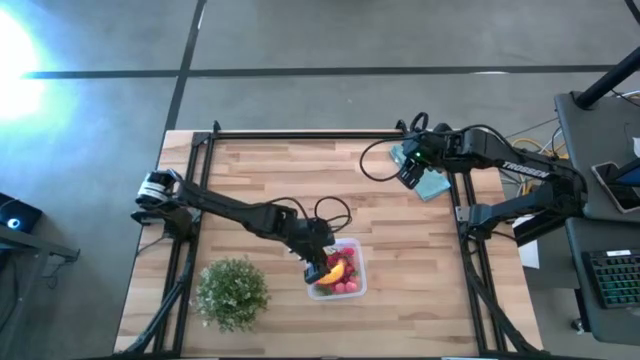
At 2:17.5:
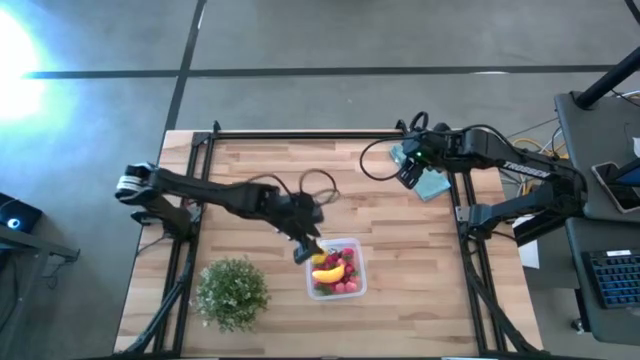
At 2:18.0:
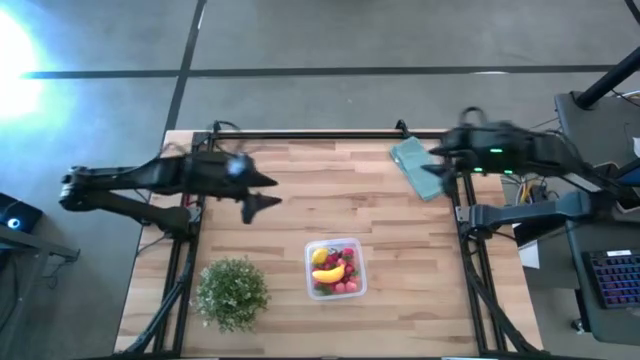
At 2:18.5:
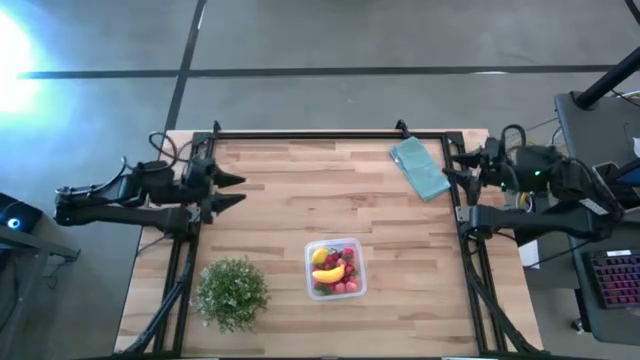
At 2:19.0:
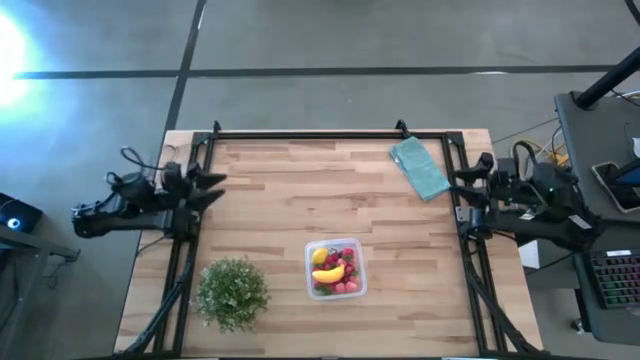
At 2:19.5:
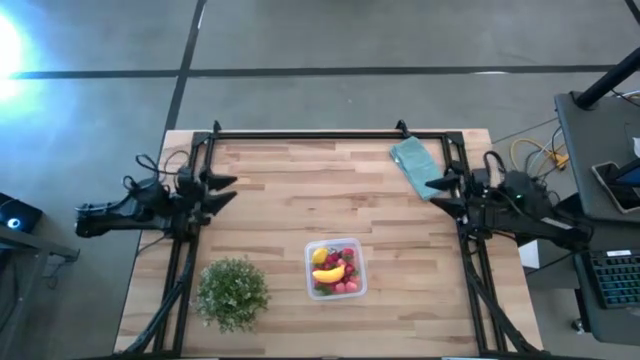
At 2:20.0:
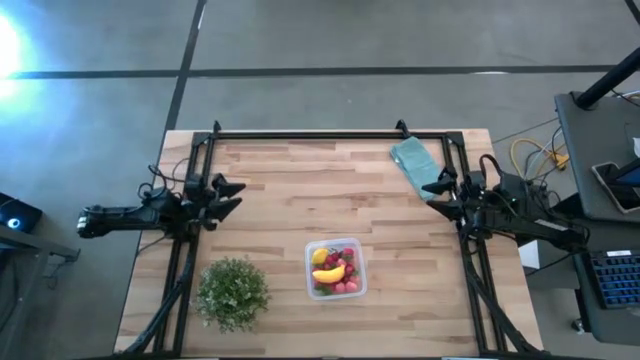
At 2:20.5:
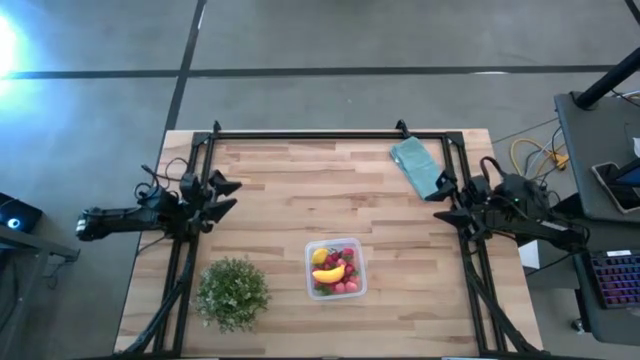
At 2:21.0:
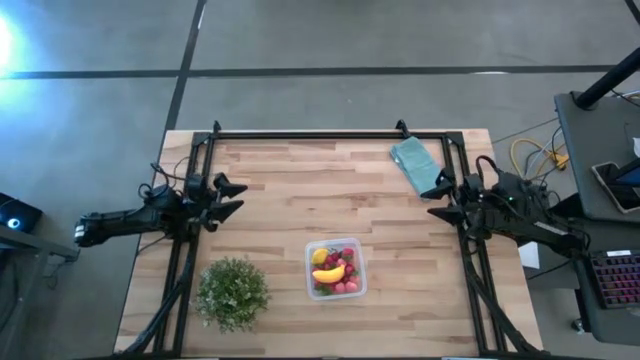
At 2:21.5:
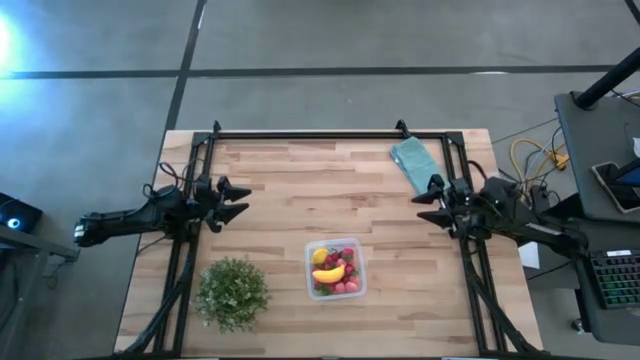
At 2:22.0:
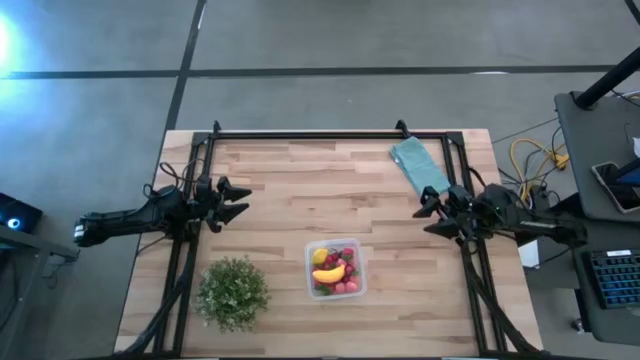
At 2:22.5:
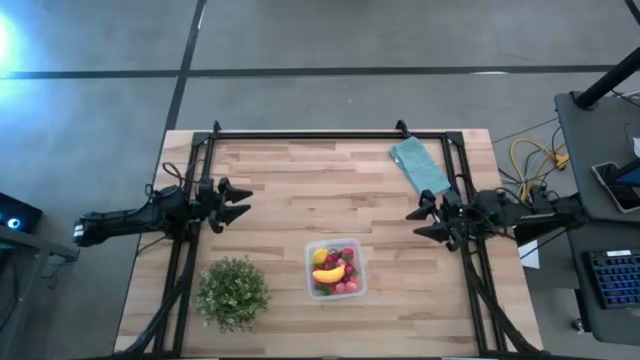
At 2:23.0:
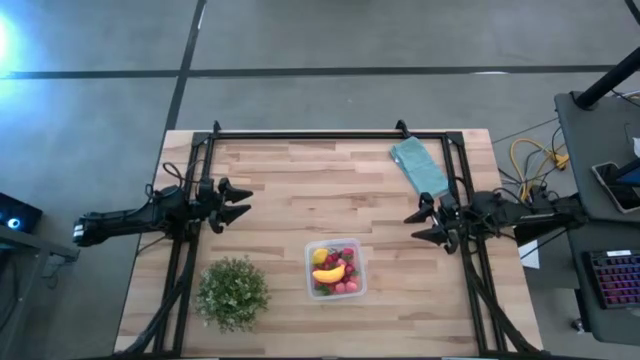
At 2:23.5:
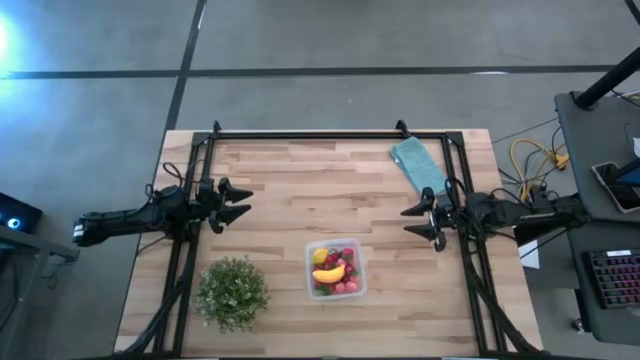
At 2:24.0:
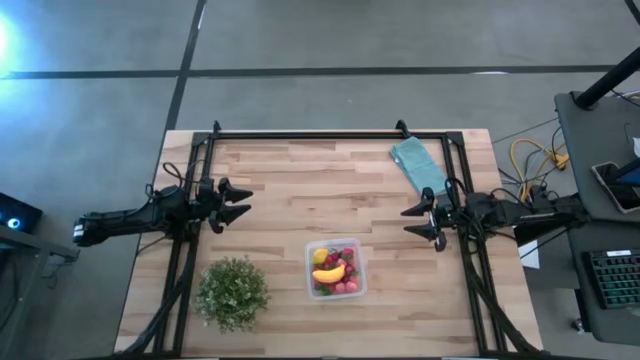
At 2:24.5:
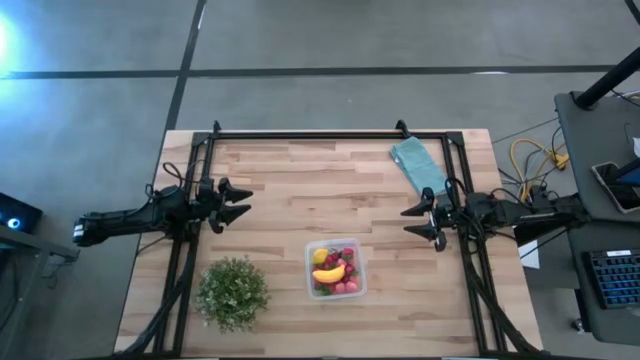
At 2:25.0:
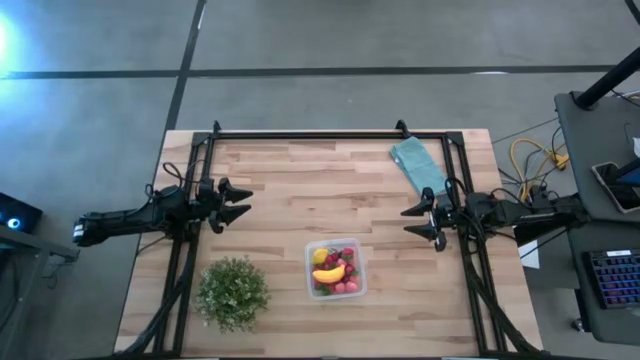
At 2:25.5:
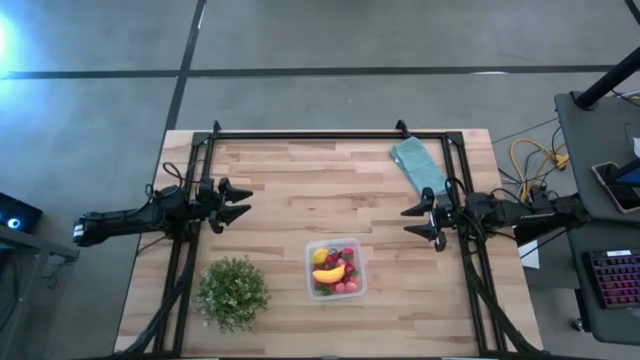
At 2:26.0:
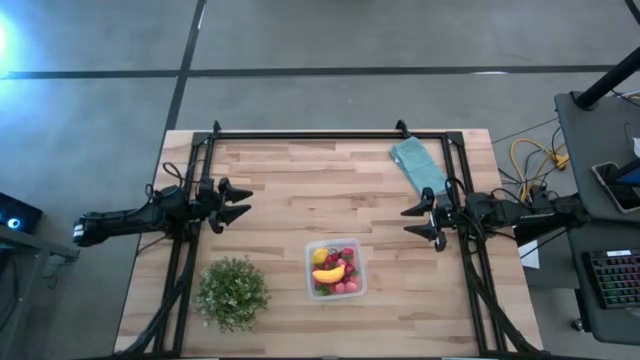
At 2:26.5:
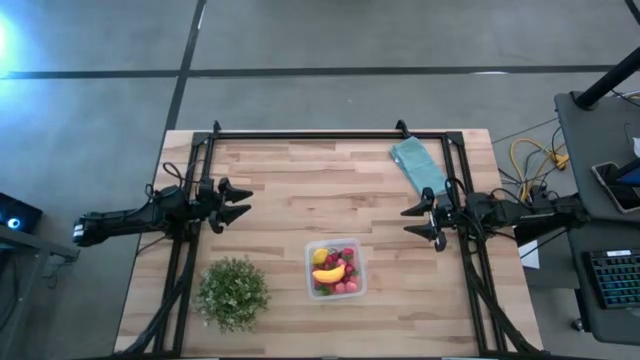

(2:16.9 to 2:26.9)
Task: Pick and placing Produce into tupperware
Return to Home Position

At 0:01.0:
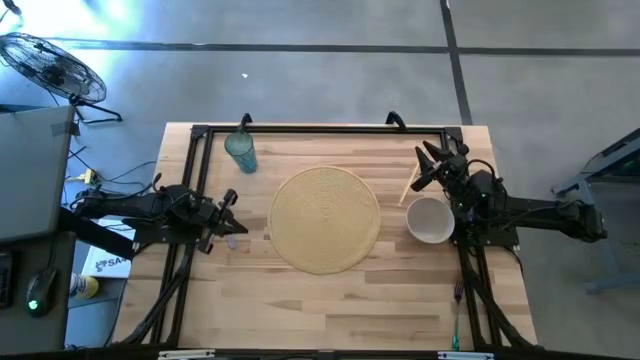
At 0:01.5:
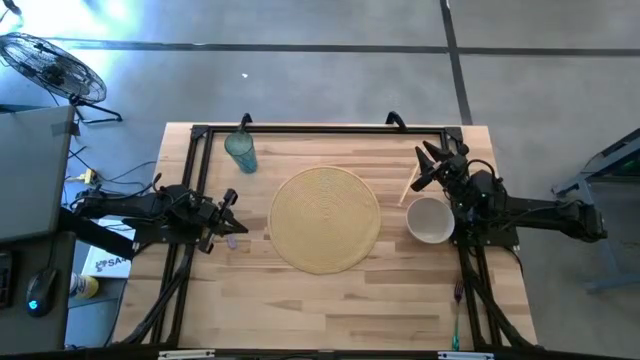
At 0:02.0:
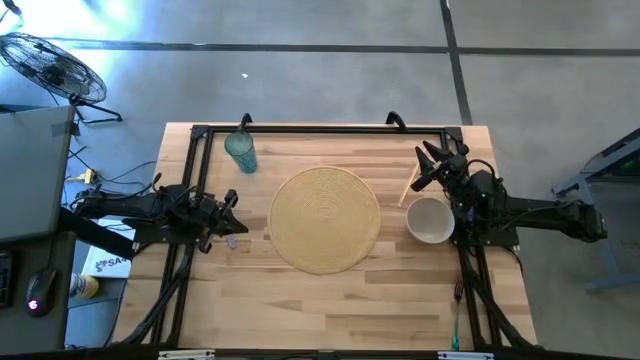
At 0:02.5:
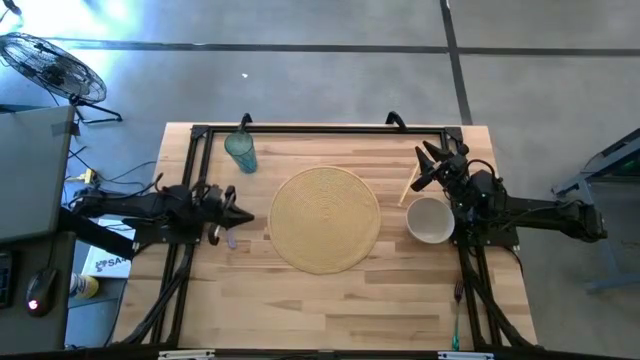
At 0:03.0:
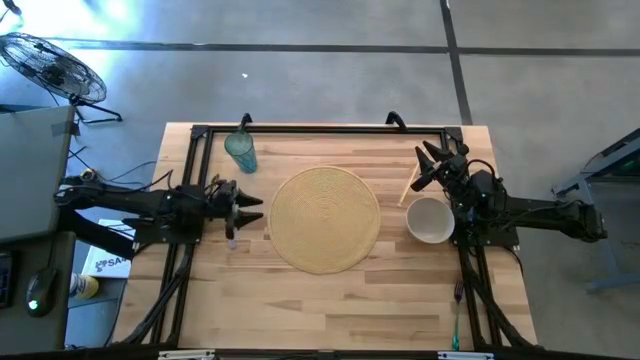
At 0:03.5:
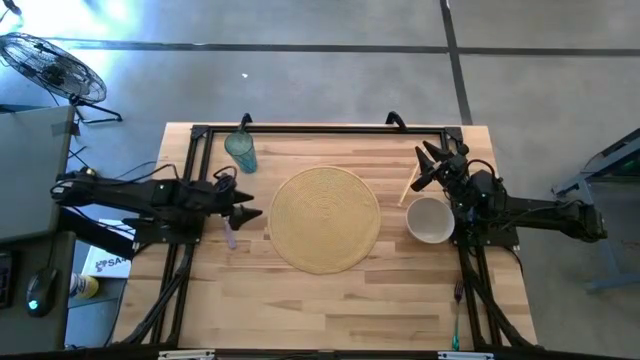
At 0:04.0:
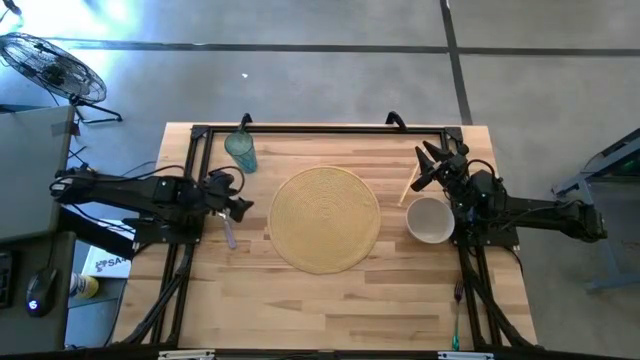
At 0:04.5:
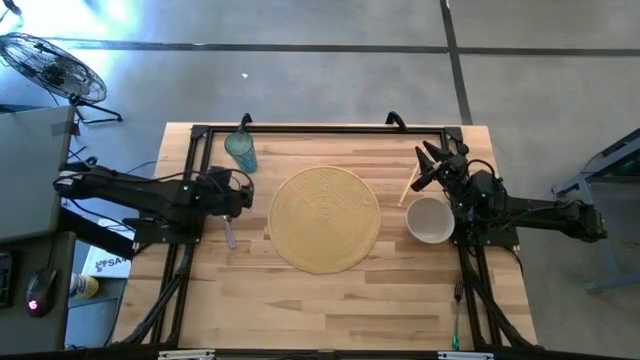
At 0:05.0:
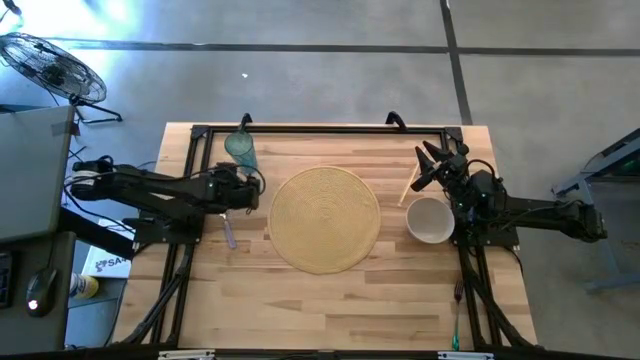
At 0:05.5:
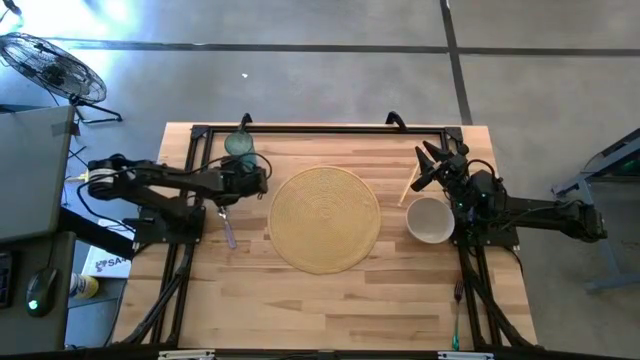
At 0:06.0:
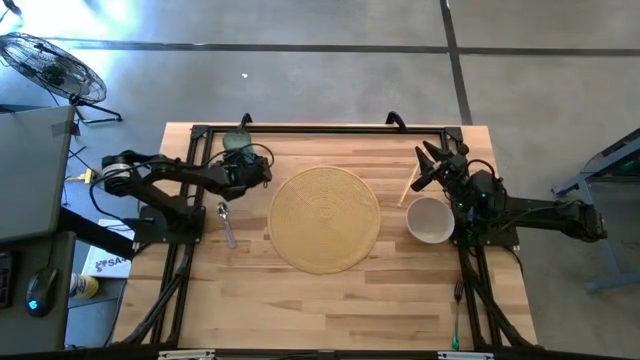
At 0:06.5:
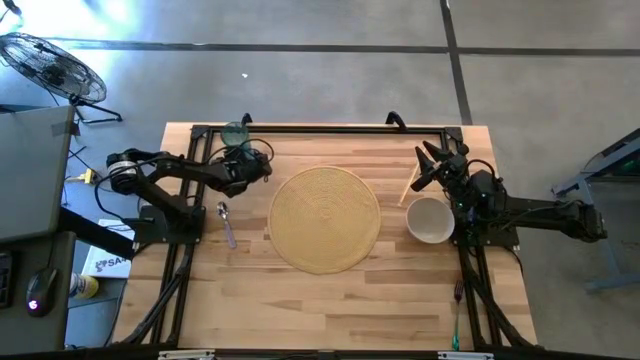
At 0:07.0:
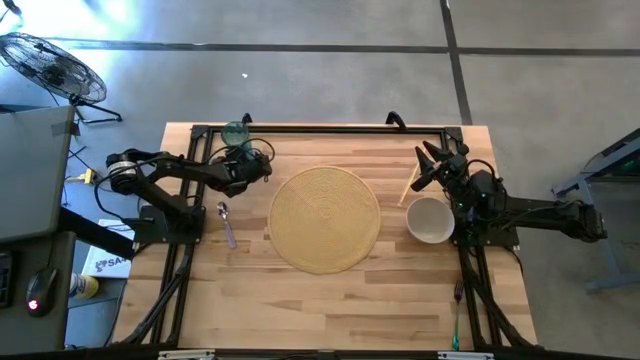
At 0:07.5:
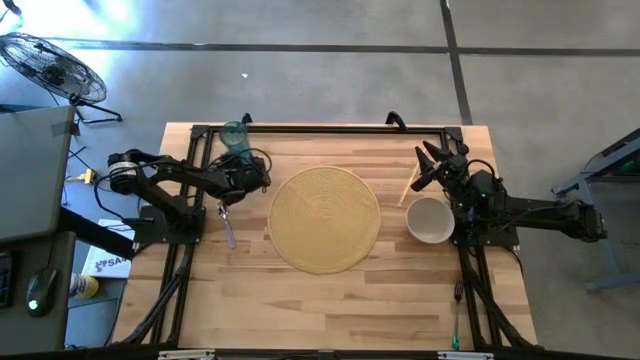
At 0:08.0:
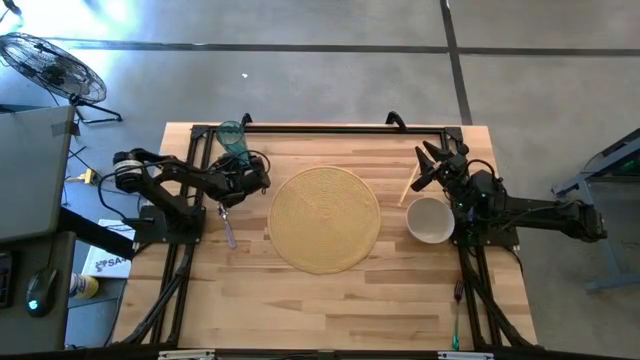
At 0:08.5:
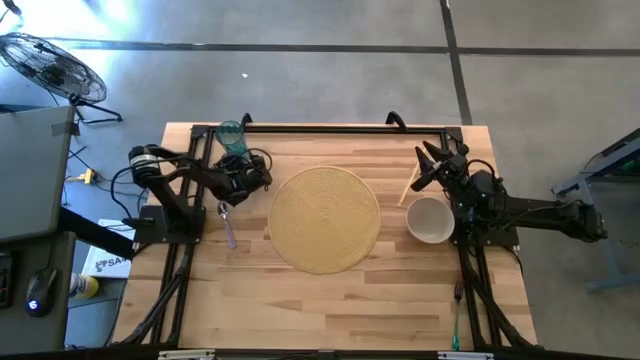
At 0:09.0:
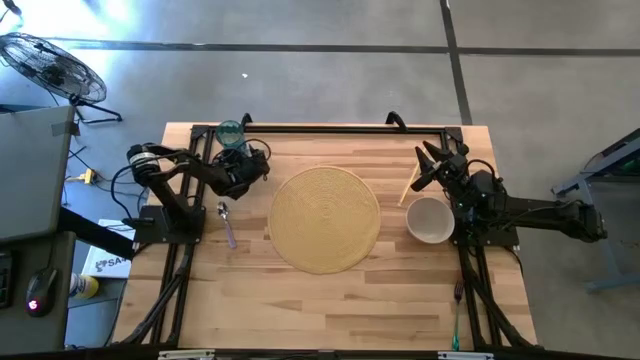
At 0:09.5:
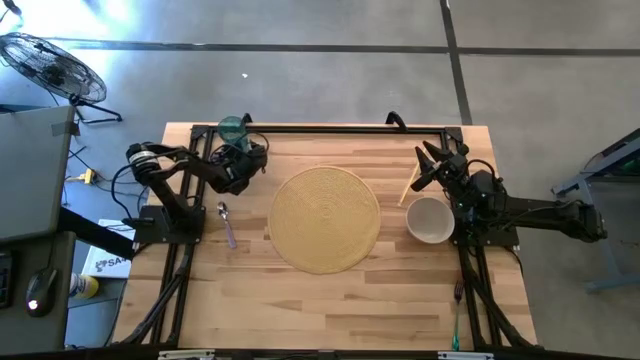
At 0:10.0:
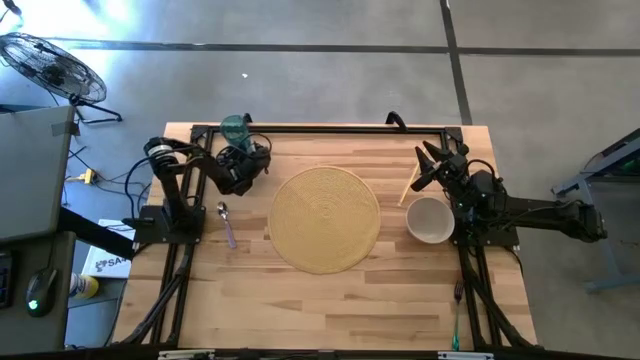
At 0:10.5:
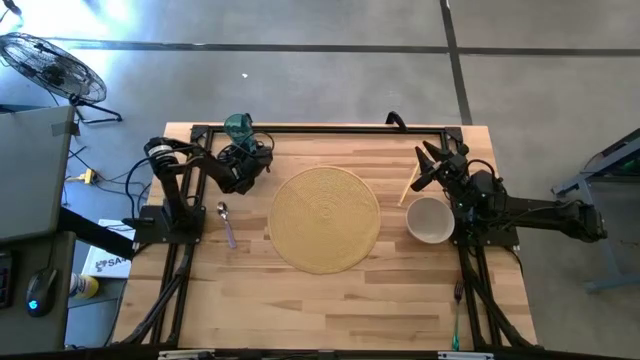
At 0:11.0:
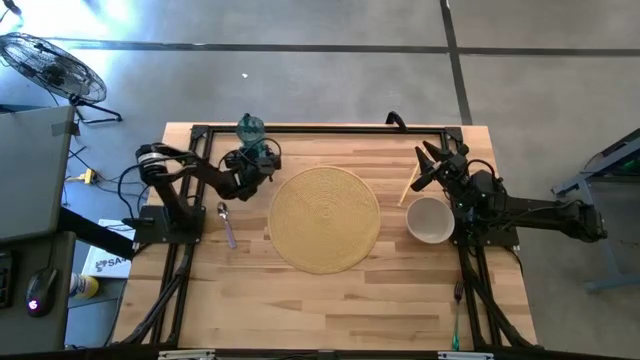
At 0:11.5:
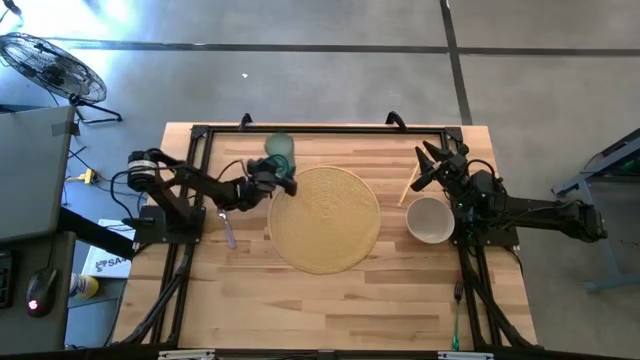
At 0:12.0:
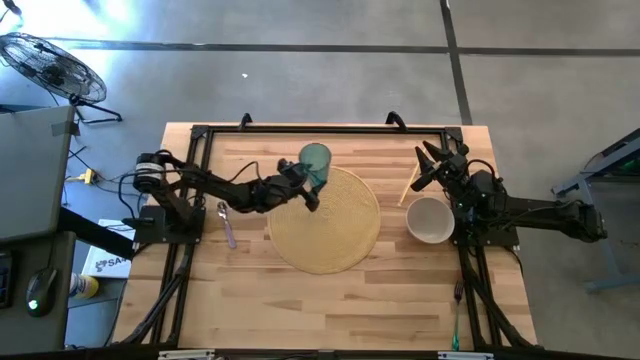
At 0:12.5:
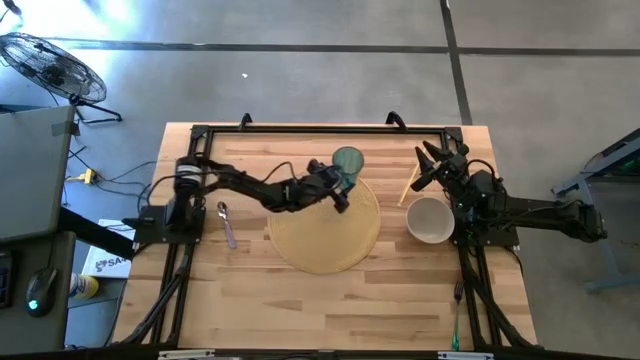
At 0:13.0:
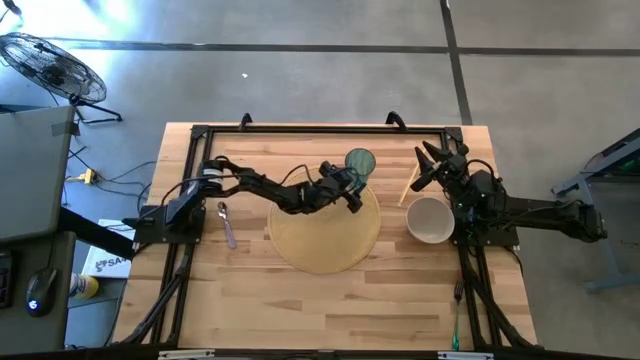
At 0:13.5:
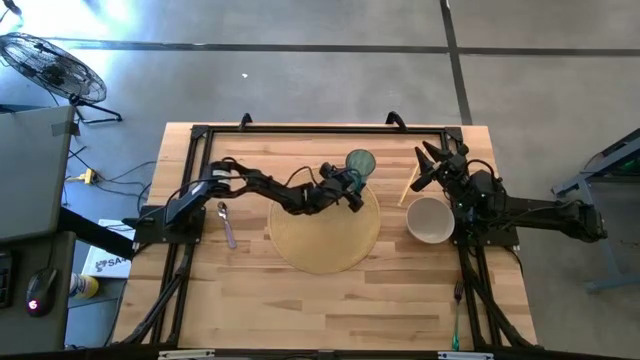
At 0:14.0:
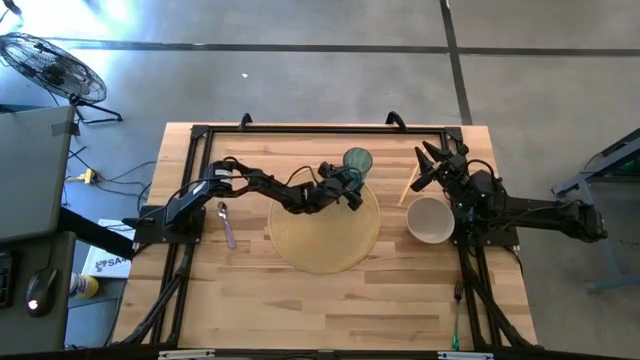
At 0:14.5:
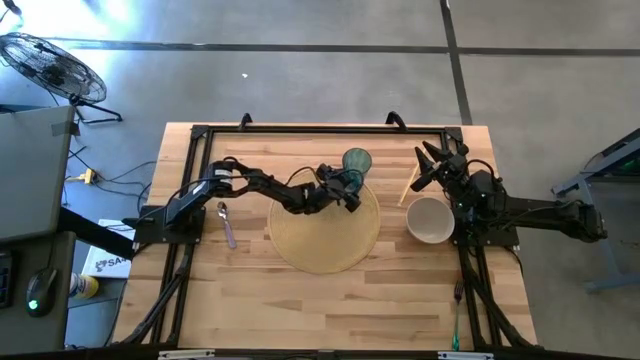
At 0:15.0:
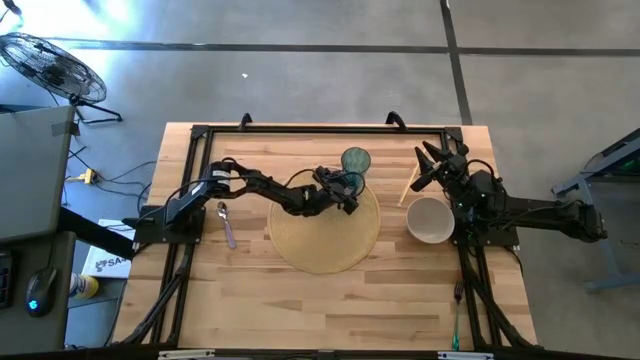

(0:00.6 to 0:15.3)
Task: Pick & Place Utensil
Put the blue cup on the brown tablemat
